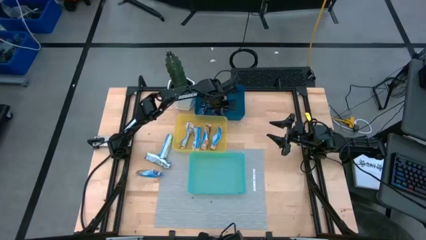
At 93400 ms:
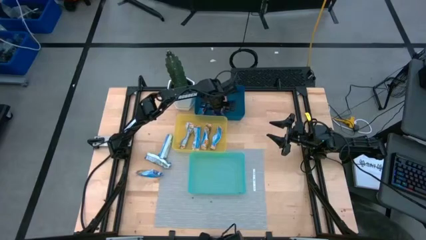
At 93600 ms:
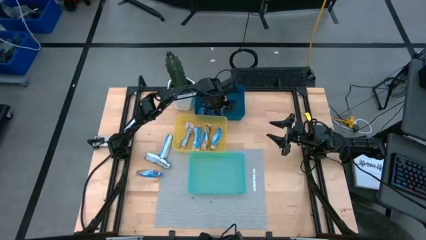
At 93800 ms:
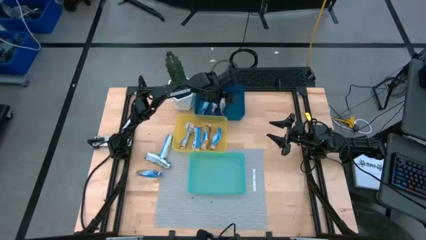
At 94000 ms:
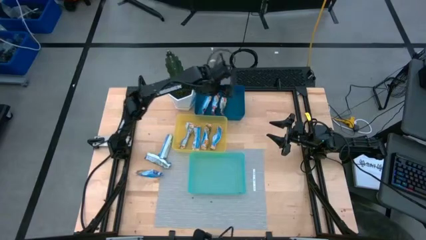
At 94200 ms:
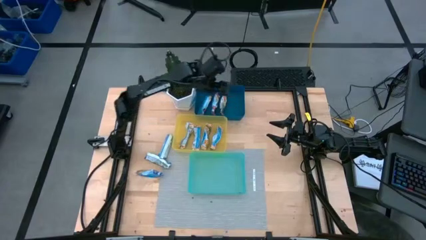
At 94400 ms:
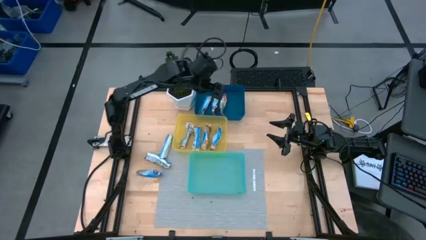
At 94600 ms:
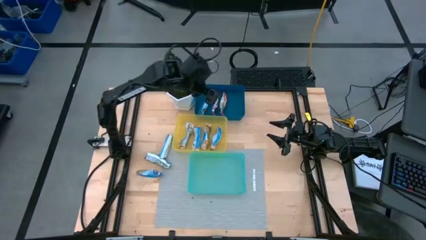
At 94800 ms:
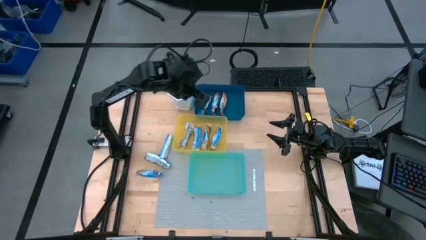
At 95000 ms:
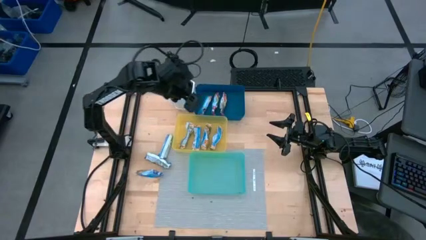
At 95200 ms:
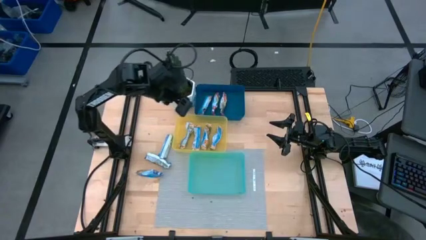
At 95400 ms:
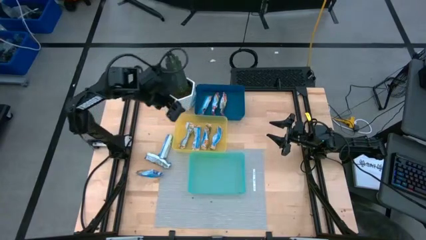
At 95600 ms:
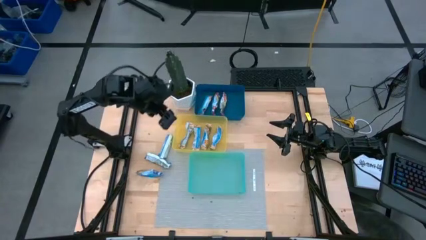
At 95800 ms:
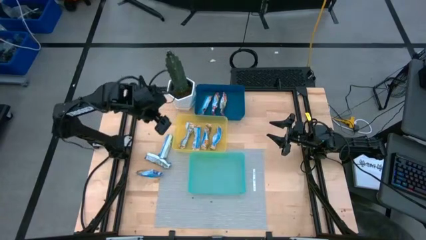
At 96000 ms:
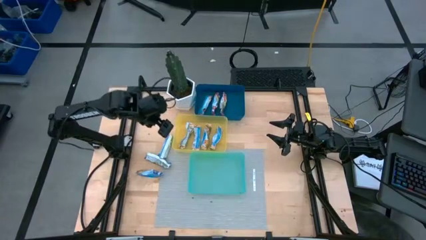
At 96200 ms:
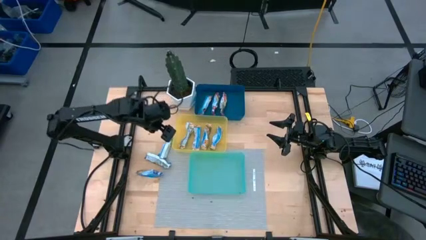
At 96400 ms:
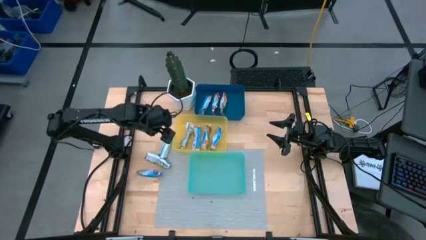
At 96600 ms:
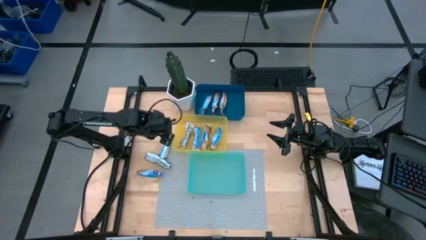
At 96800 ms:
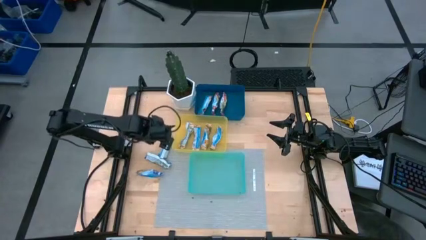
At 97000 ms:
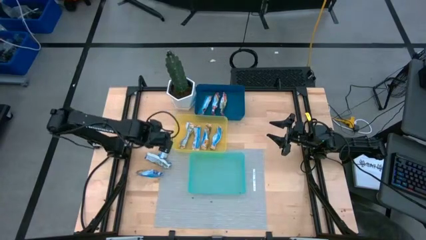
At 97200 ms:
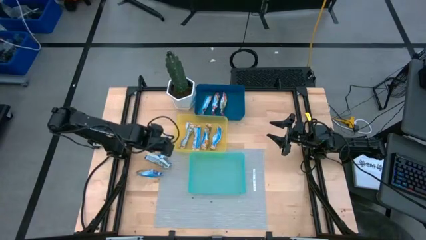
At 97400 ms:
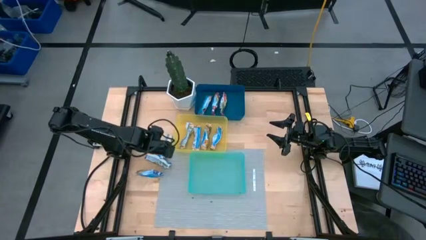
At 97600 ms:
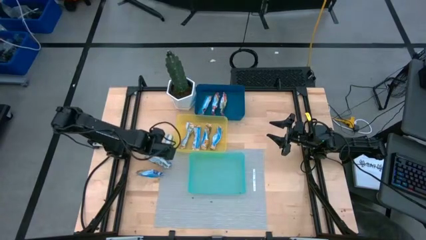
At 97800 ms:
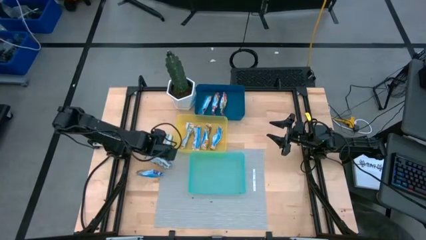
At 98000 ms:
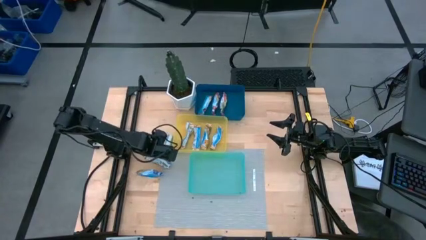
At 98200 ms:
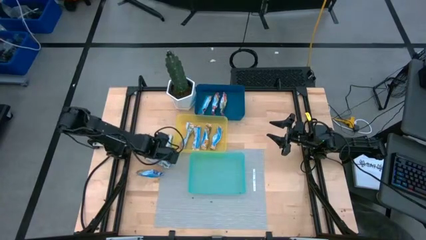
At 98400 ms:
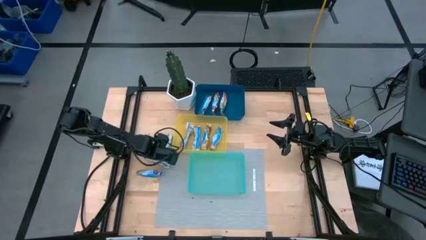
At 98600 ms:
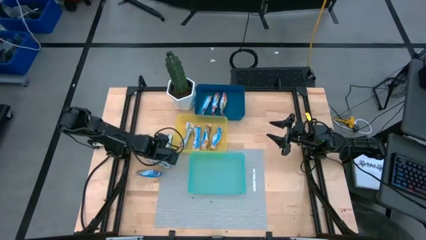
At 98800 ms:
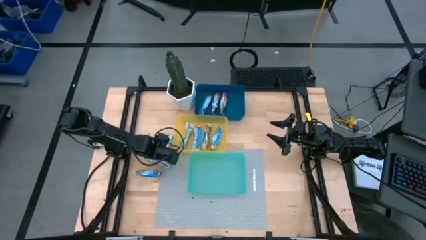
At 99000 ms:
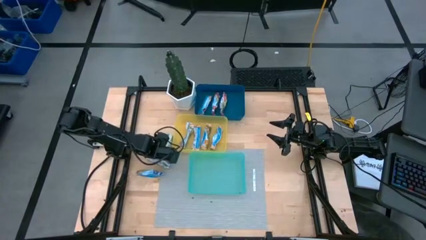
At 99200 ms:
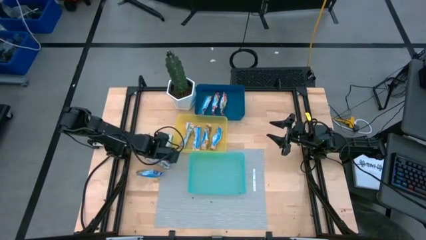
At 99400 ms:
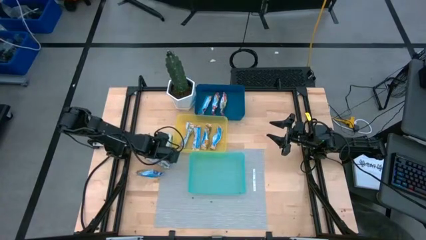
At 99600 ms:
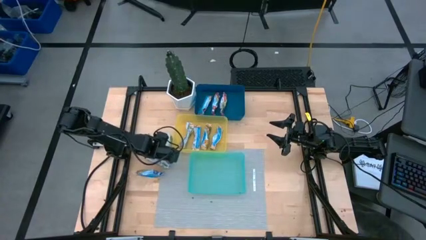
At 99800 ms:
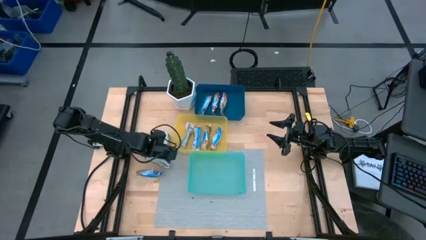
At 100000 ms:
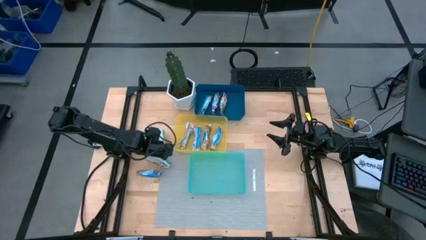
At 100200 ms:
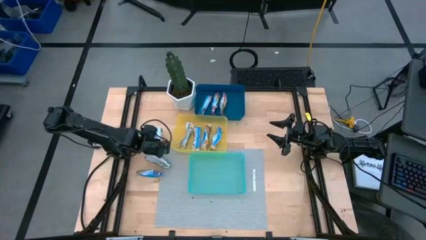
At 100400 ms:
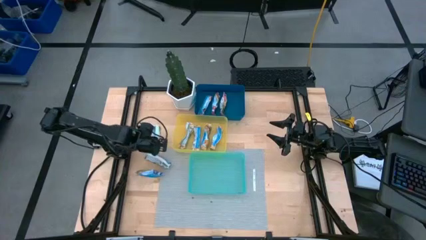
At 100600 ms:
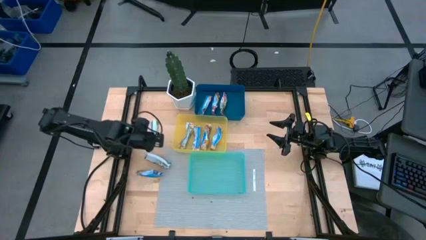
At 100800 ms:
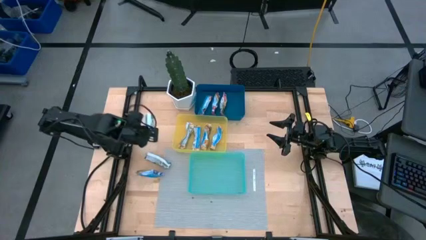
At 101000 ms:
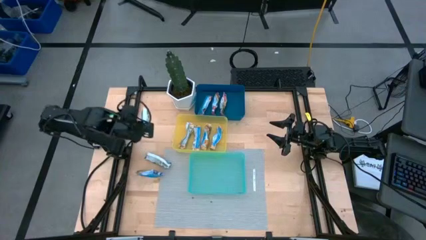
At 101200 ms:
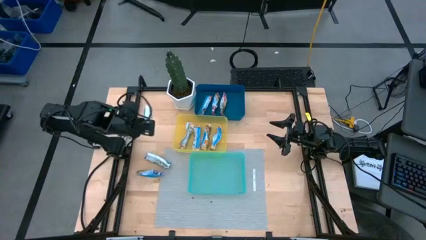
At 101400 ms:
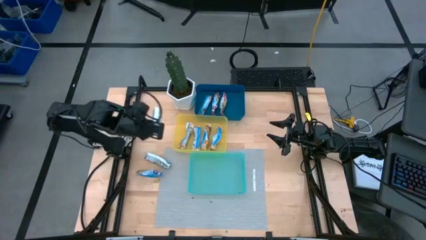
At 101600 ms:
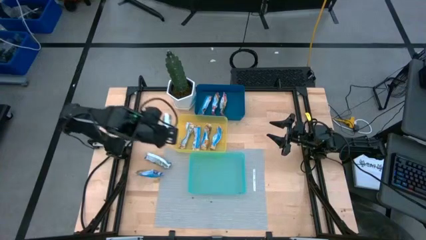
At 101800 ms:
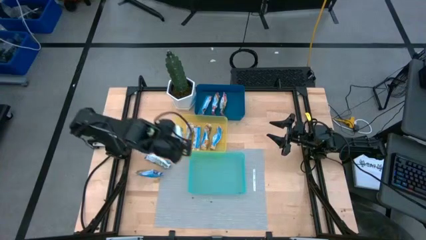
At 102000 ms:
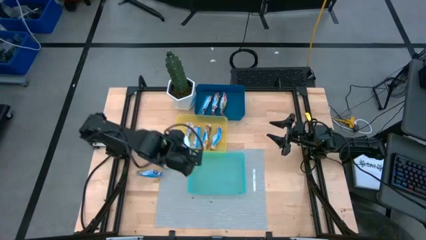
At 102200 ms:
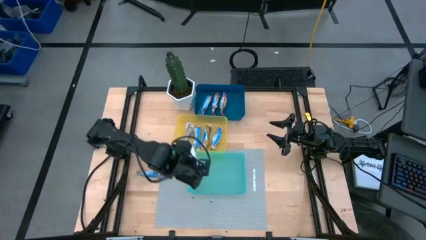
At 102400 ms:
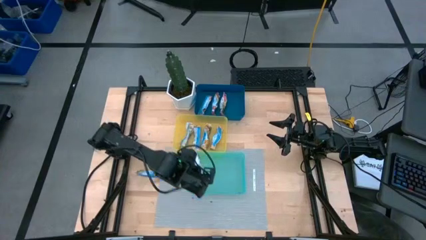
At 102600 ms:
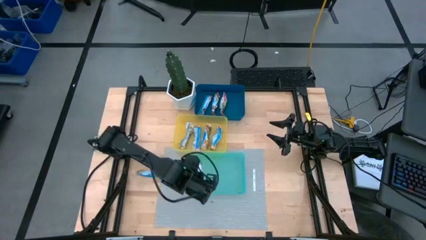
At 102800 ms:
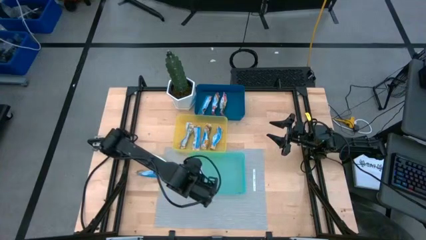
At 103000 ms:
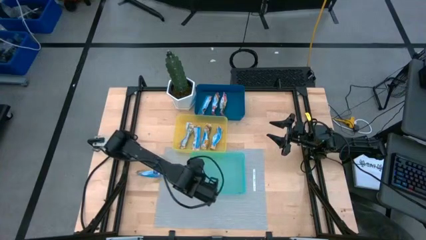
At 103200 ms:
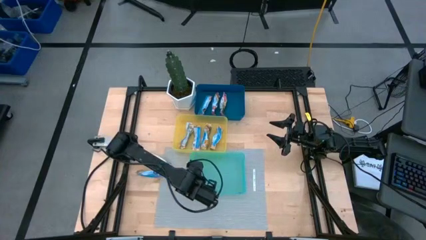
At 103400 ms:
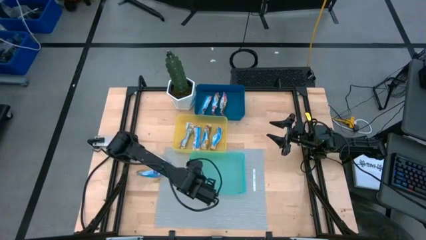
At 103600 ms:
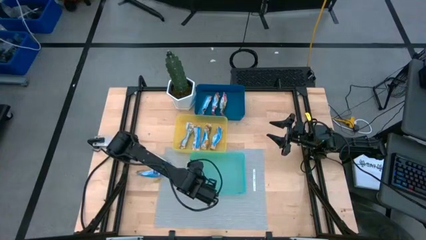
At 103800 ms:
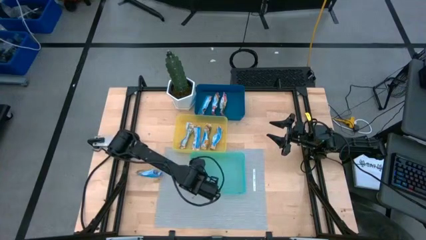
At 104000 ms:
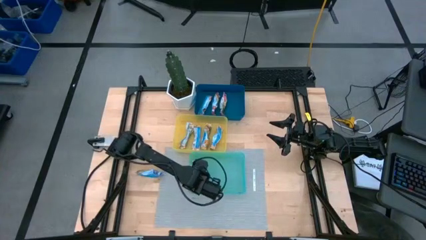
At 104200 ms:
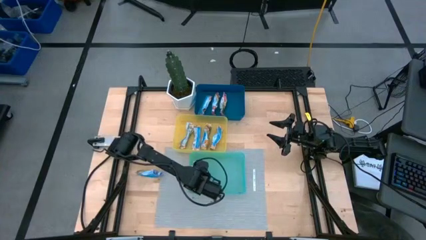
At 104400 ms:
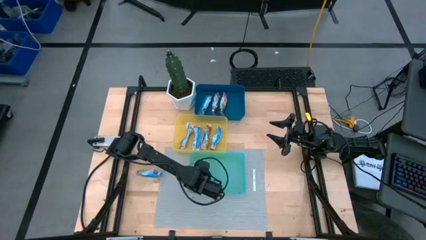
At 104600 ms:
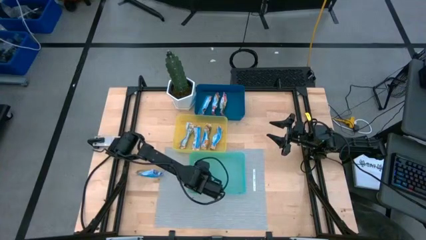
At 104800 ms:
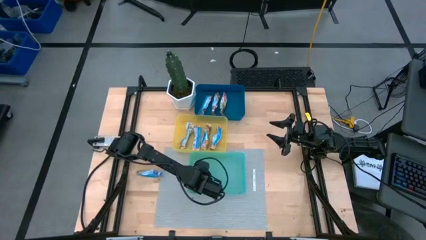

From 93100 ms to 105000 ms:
Task: Pick and place Granola Bars by type
Put the blue granola bar into the green bin
